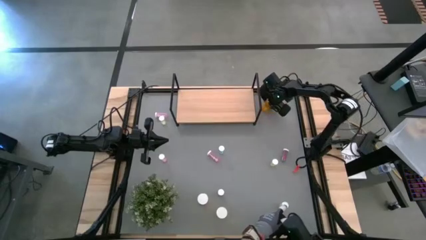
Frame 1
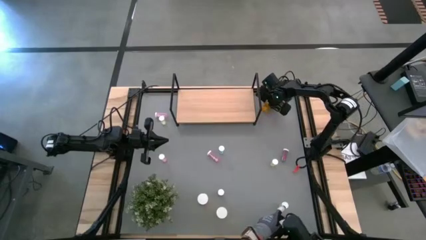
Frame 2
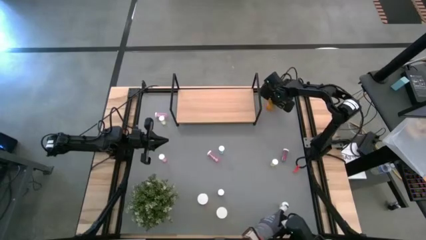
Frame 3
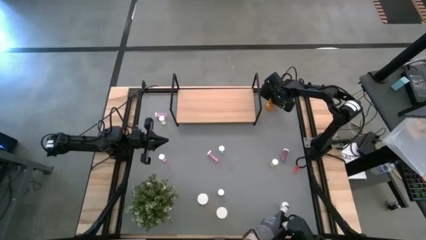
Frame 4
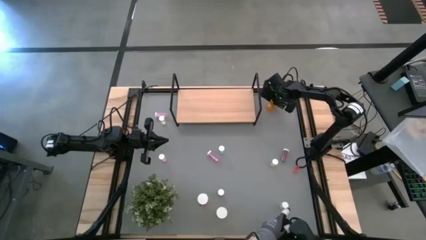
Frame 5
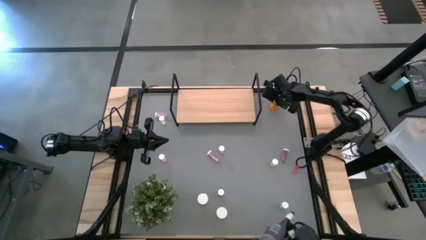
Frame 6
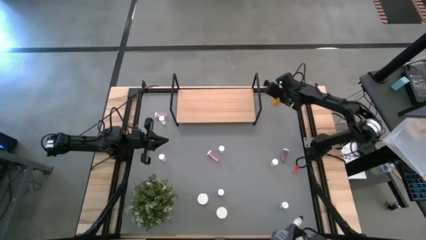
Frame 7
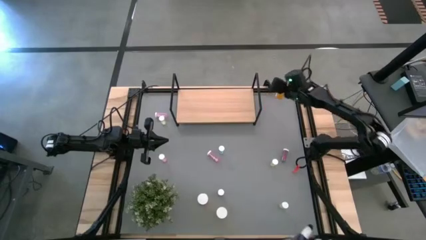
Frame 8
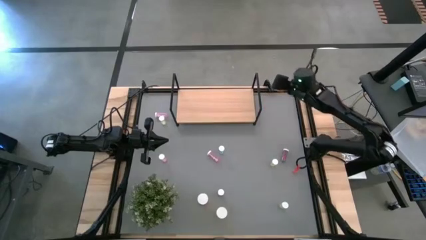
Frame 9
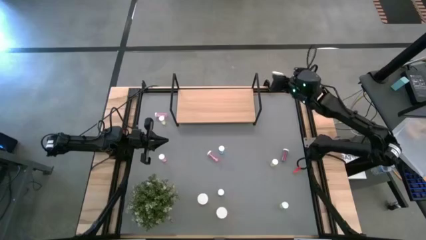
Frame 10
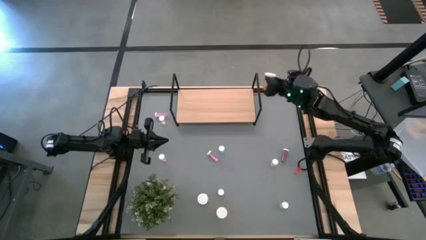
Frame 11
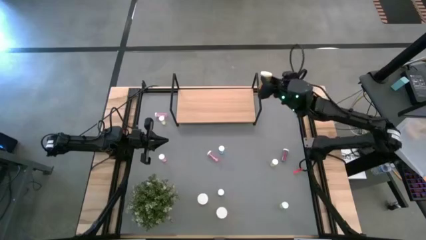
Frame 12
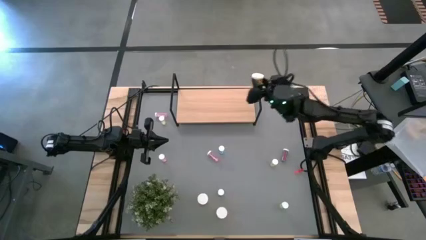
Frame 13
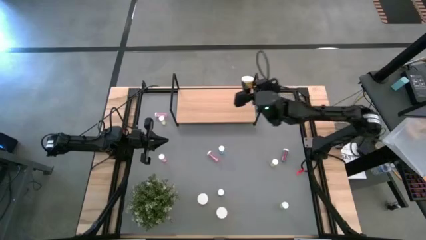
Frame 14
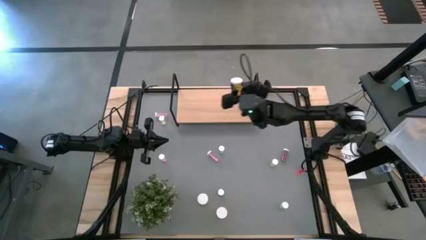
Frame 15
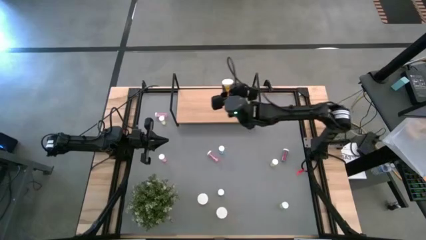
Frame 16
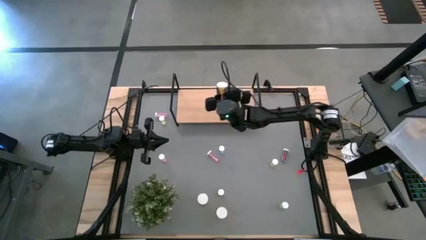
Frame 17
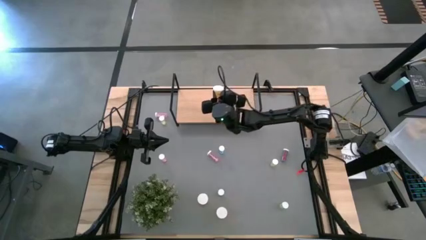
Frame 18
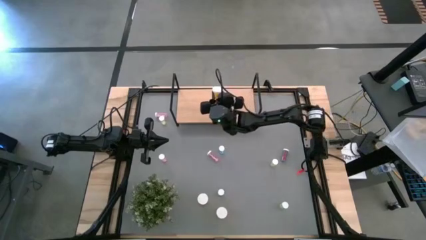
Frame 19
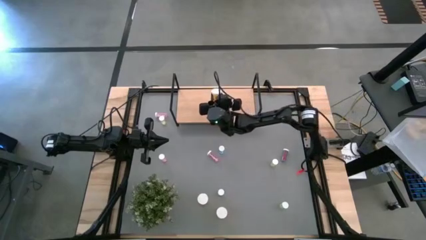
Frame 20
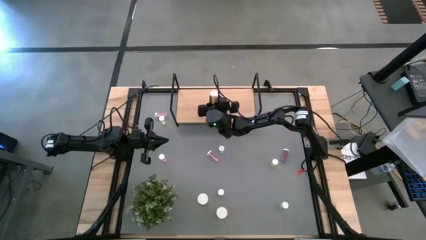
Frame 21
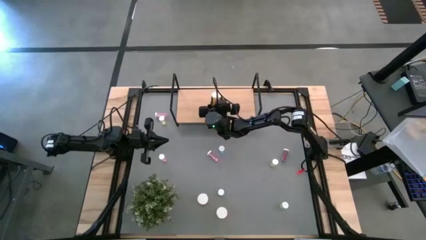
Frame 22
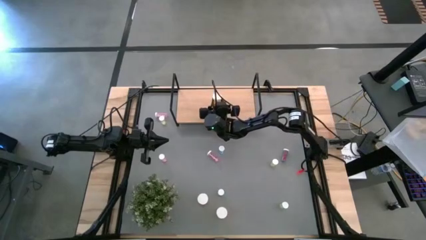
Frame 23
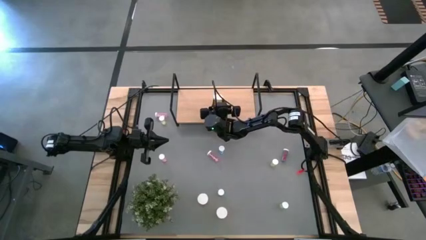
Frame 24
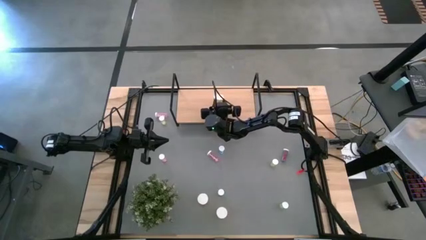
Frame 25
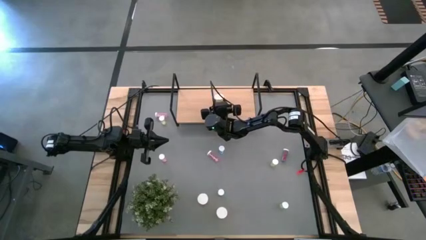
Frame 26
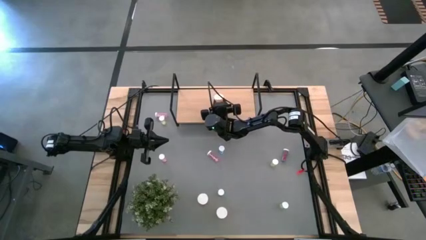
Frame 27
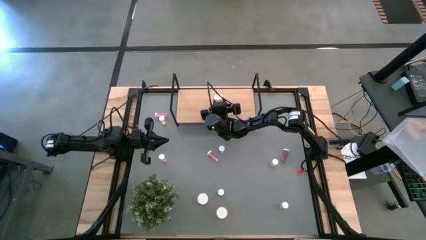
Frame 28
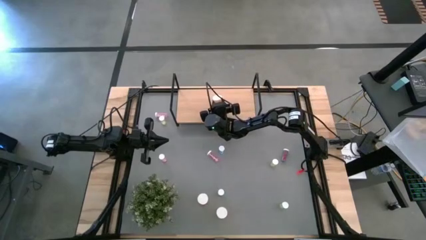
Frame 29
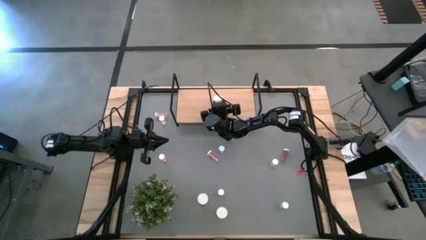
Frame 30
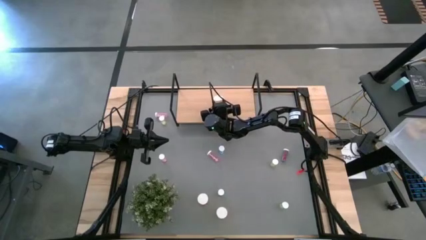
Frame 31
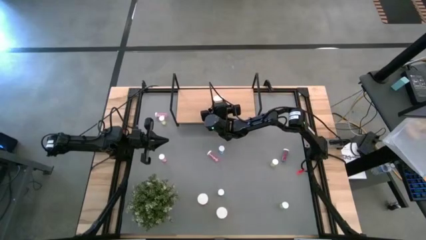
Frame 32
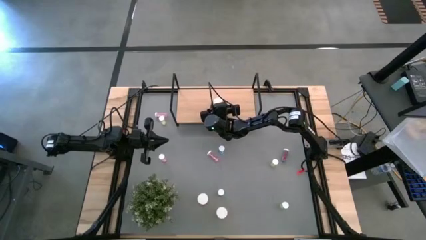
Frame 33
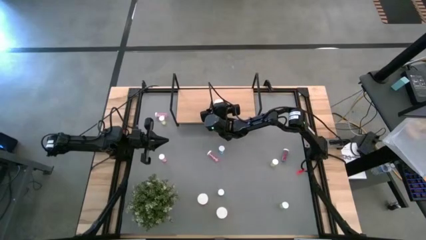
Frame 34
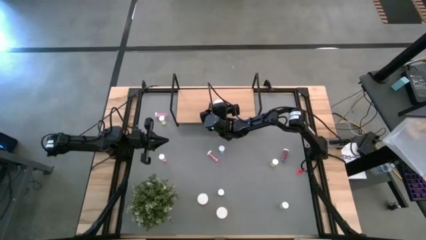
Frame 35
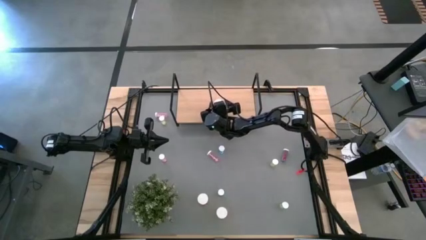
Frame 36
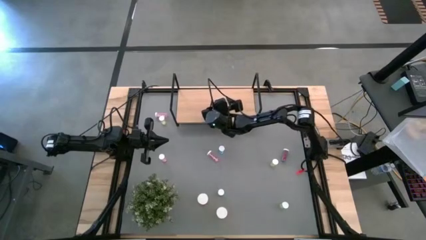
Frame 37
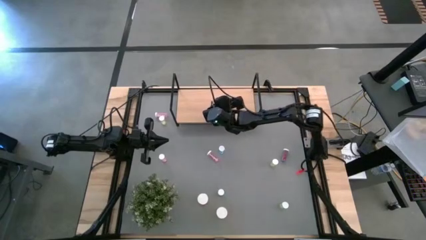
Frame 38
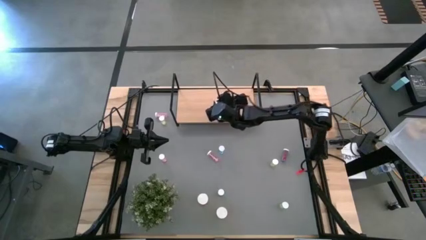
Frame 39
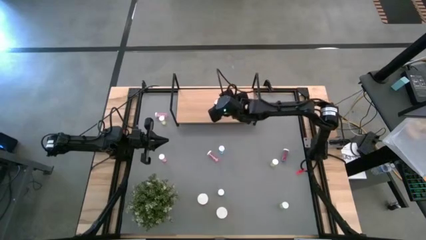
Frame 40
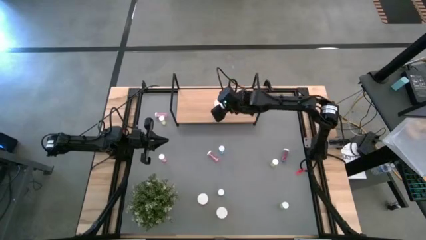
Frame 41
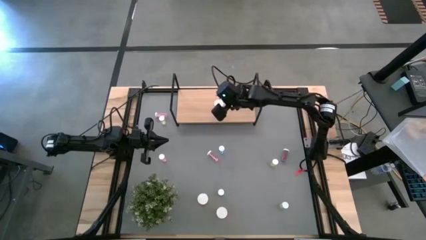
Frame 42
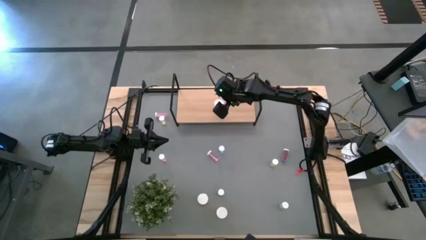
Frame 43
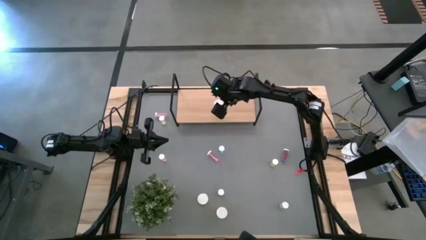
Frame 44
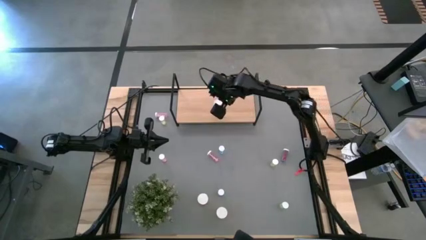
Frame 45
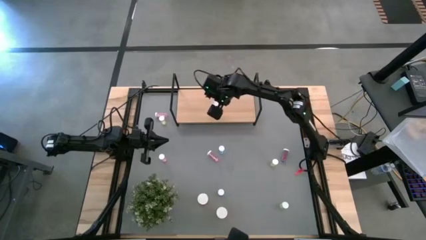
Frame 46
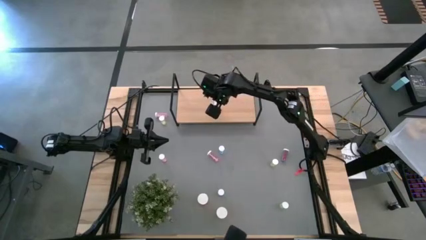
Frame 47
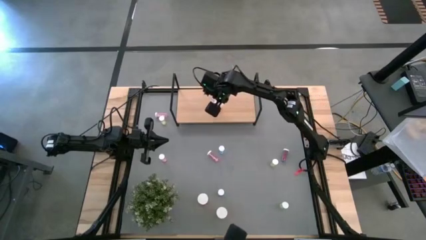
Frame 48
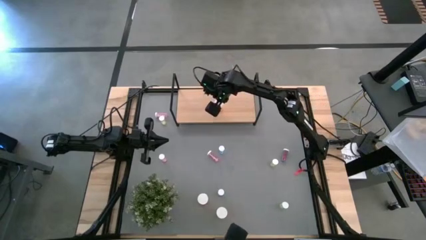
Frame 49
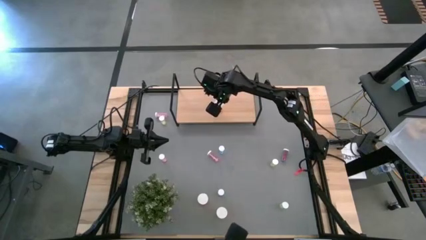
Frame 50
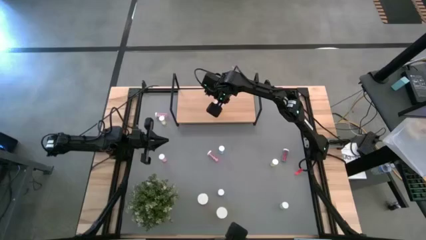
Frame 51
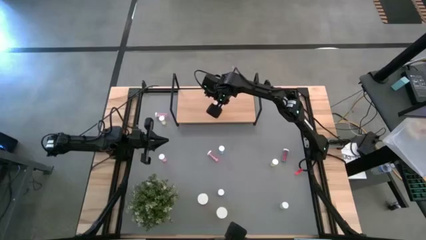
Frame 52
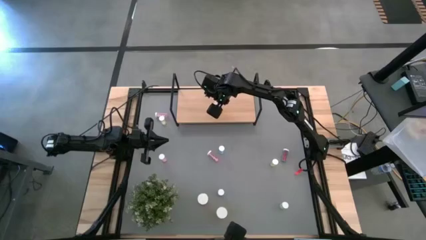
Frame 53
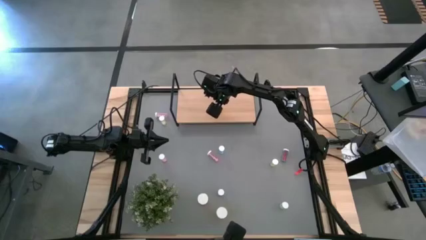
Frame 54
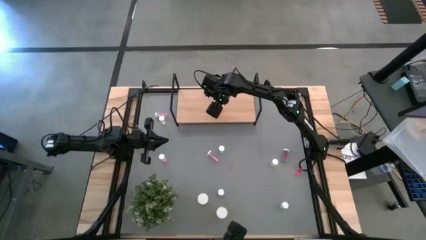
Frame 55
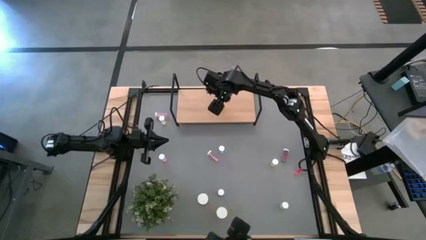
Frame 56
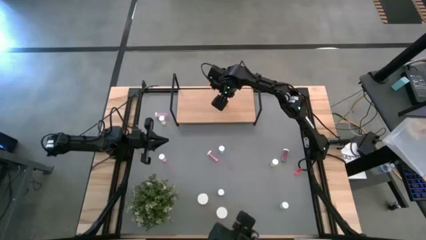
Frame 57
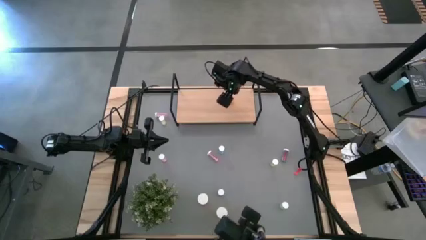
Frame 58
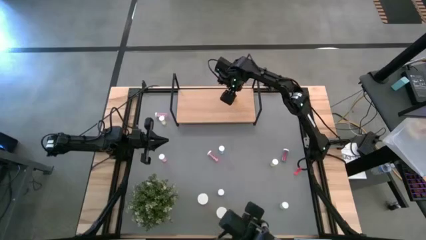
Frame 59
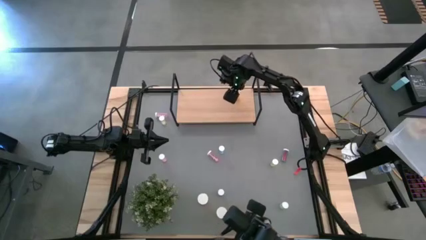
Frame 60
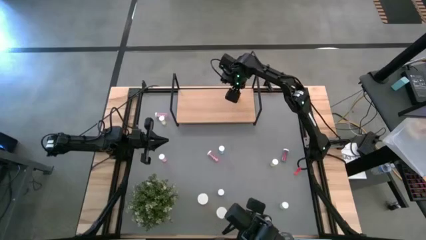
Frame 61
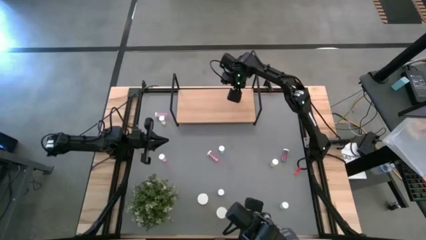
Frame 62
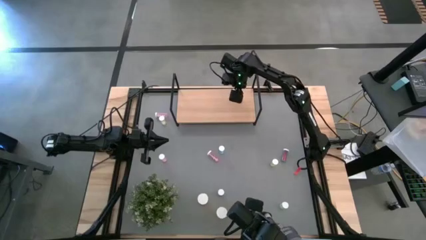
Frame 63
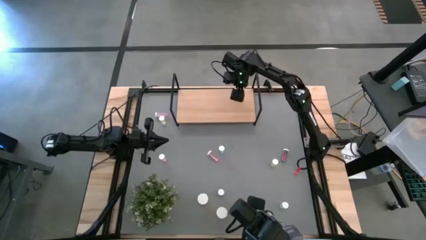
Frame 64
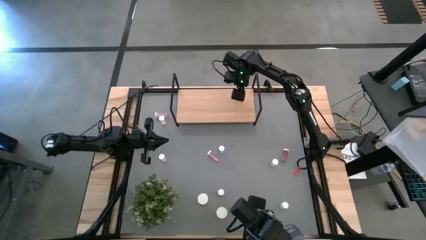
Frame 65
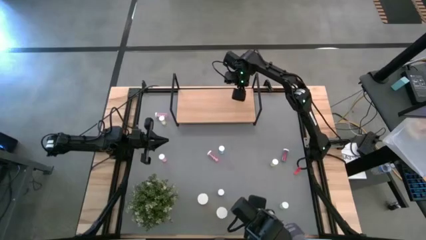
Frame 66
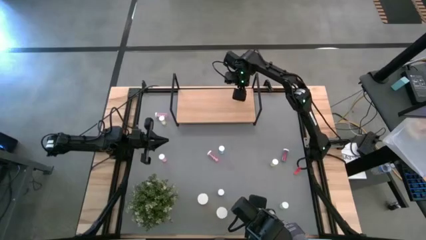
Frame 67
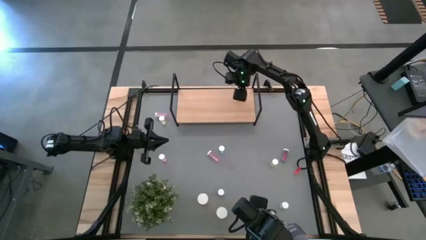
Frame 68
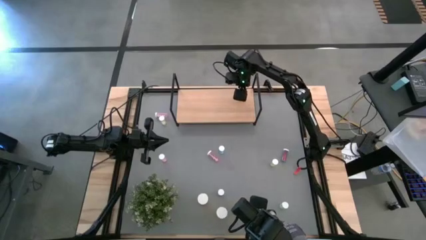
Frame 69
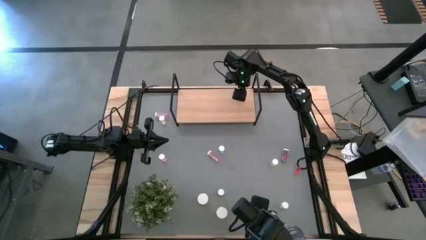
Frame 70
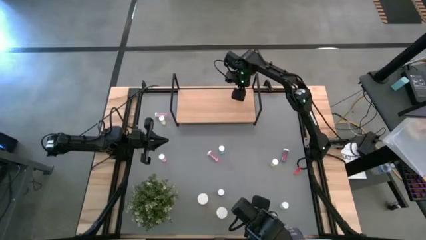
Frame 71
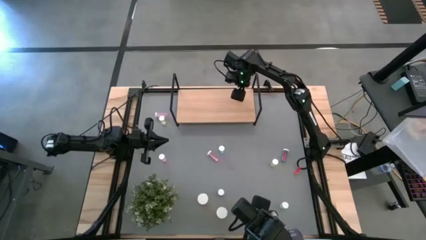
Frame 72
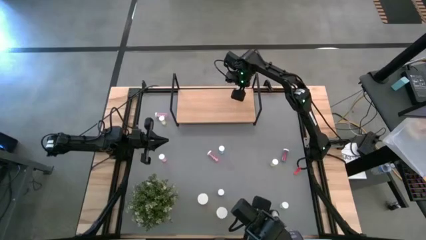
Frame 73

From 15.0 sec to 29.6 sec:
Task: Pick and place medicine bottles onto shelf by color
Put the top right orange pill bottle on the shelf
